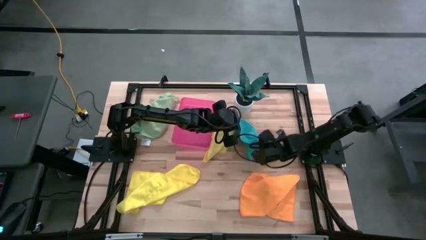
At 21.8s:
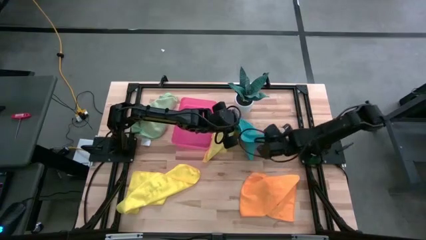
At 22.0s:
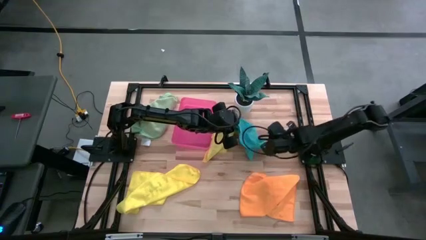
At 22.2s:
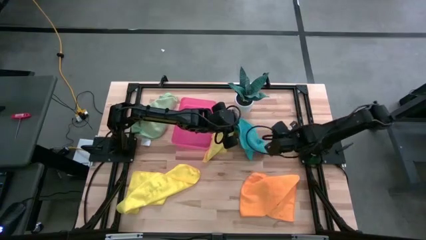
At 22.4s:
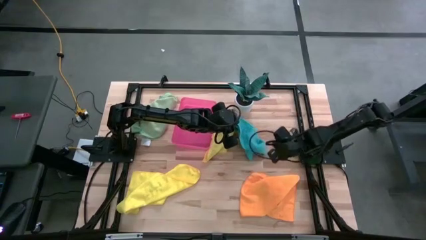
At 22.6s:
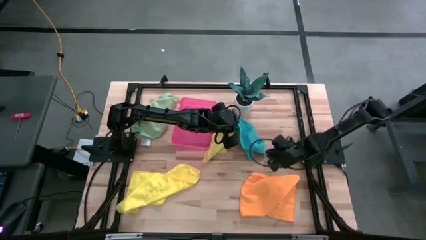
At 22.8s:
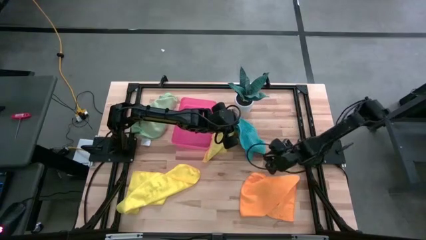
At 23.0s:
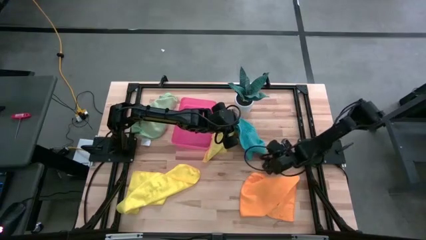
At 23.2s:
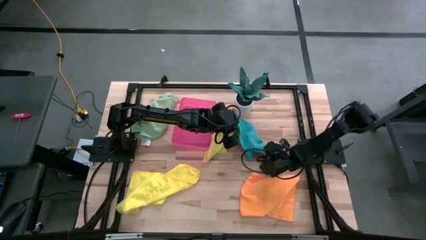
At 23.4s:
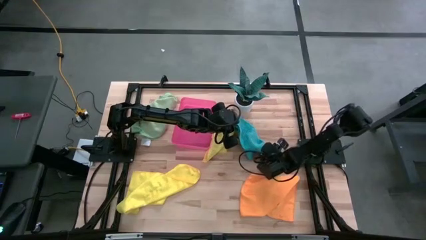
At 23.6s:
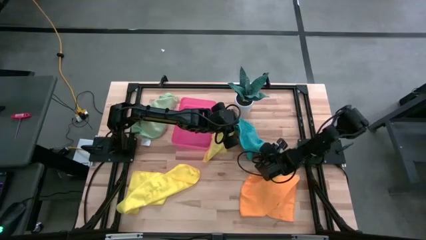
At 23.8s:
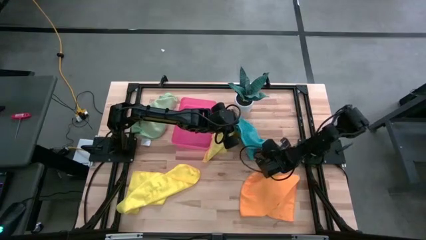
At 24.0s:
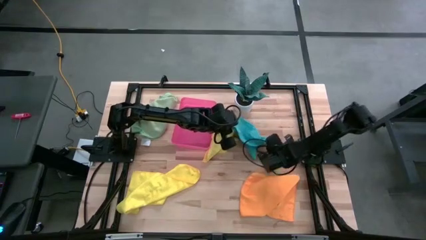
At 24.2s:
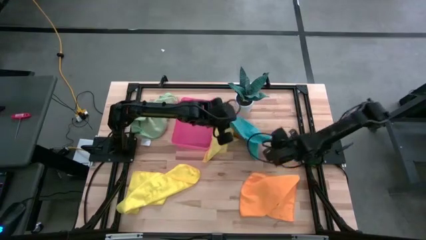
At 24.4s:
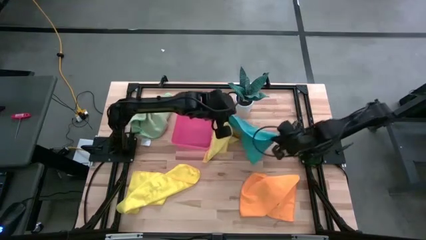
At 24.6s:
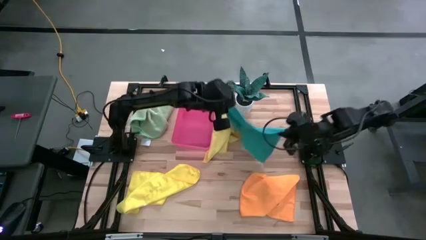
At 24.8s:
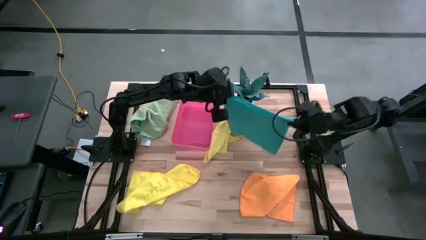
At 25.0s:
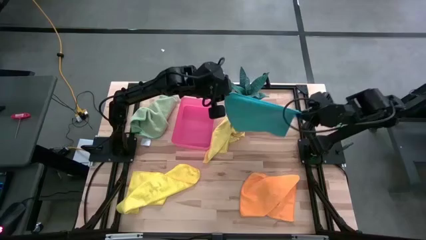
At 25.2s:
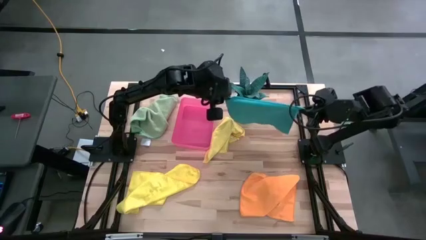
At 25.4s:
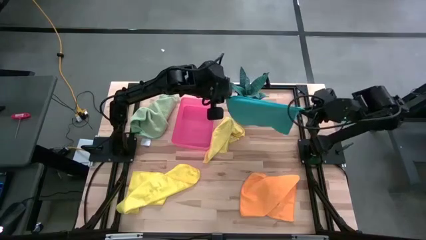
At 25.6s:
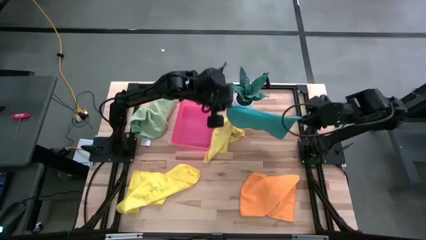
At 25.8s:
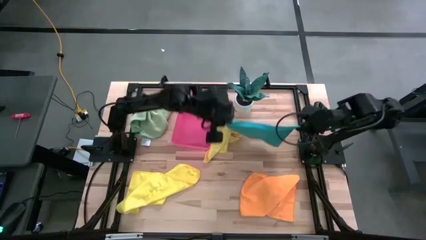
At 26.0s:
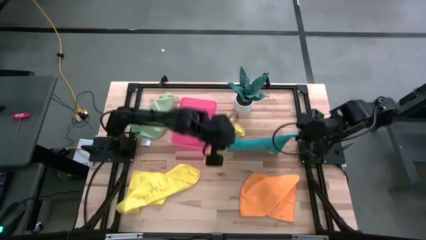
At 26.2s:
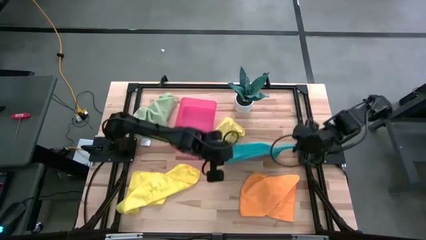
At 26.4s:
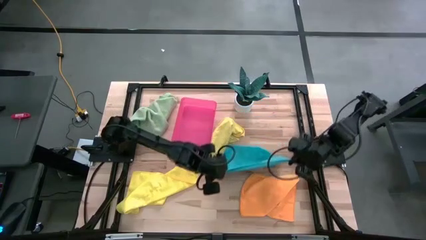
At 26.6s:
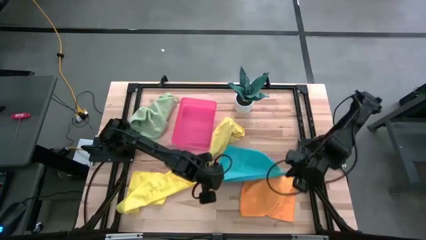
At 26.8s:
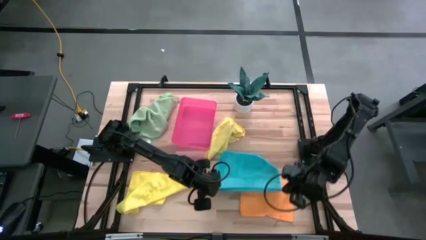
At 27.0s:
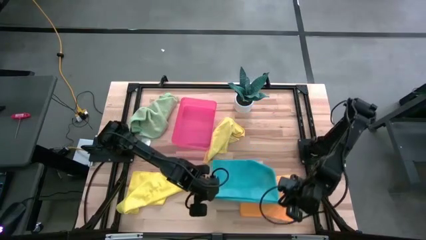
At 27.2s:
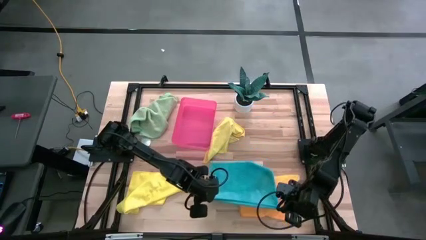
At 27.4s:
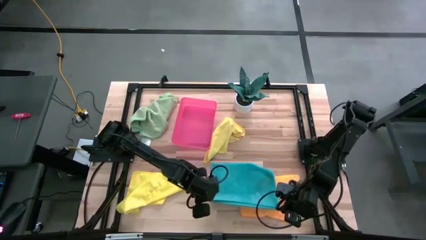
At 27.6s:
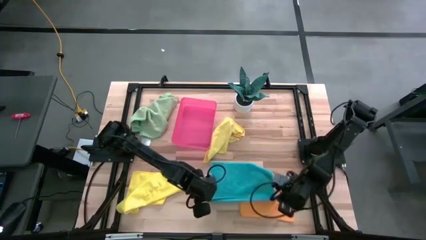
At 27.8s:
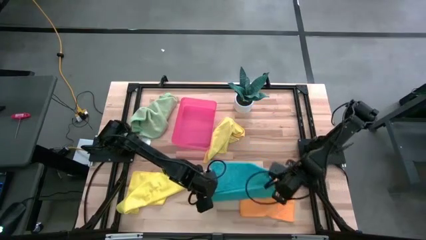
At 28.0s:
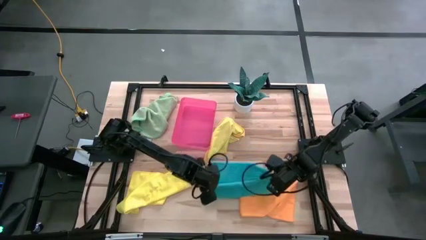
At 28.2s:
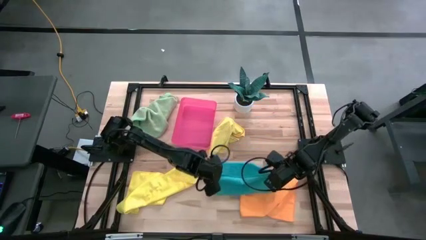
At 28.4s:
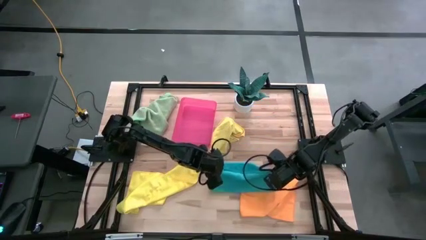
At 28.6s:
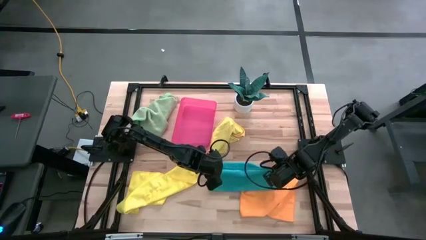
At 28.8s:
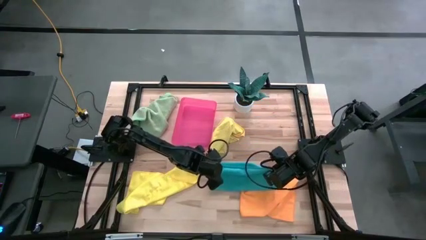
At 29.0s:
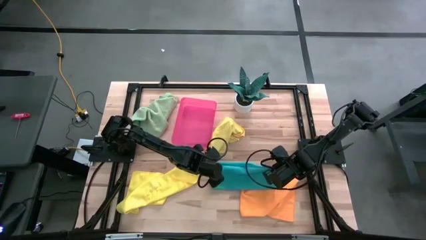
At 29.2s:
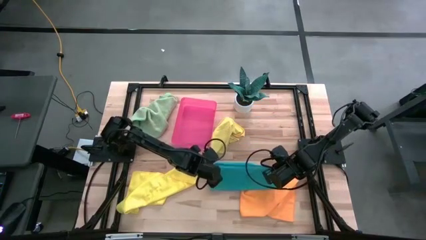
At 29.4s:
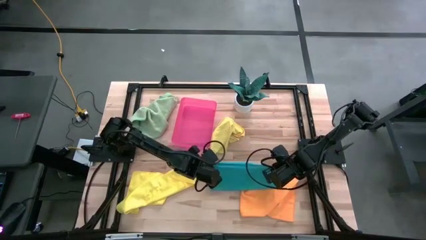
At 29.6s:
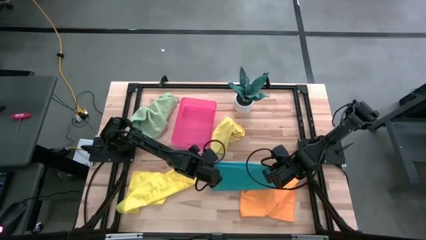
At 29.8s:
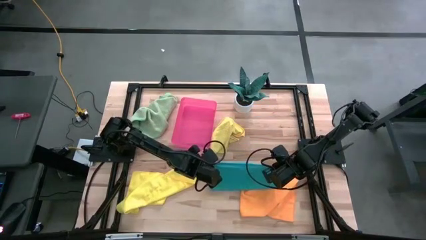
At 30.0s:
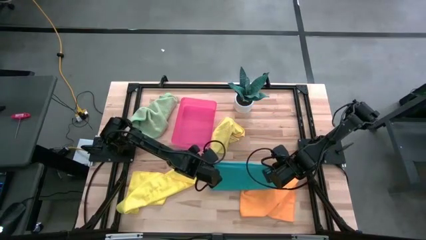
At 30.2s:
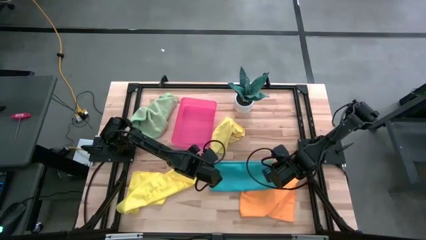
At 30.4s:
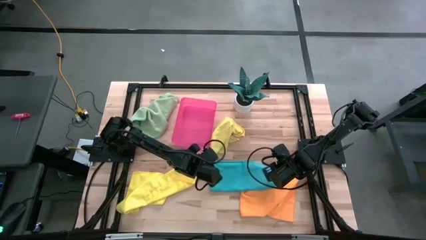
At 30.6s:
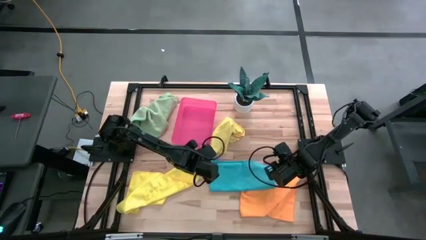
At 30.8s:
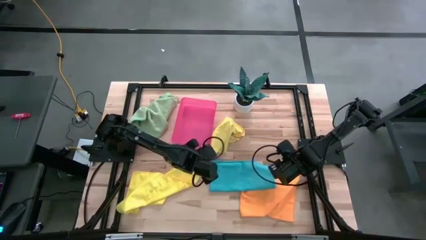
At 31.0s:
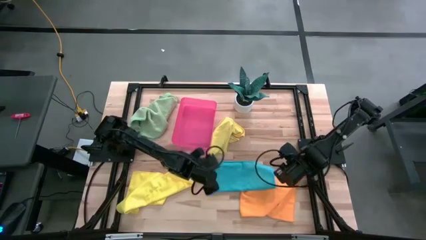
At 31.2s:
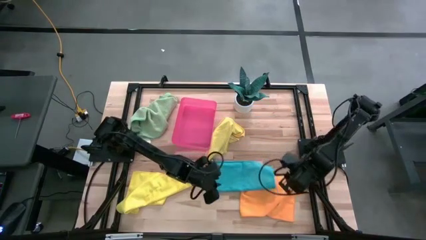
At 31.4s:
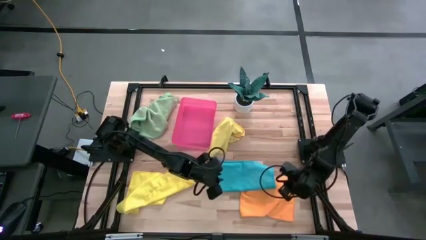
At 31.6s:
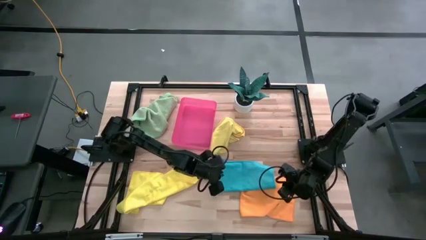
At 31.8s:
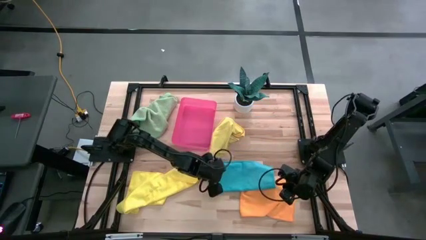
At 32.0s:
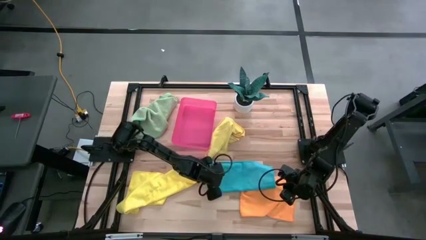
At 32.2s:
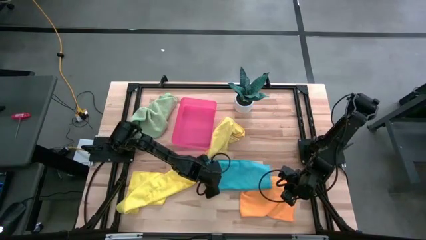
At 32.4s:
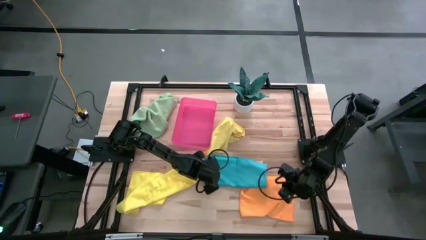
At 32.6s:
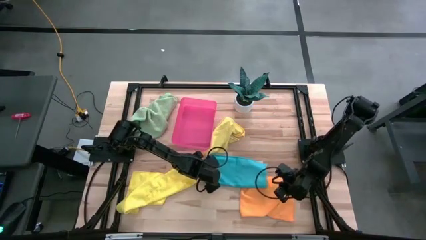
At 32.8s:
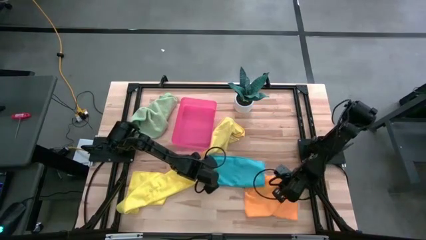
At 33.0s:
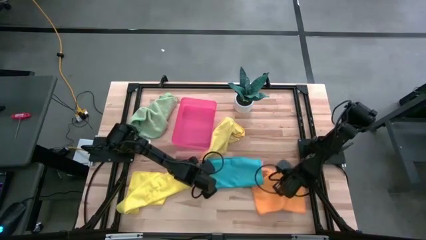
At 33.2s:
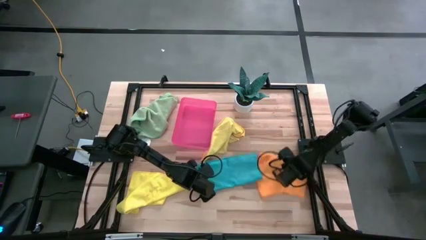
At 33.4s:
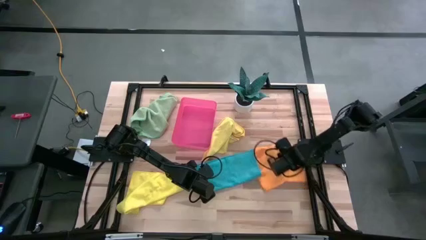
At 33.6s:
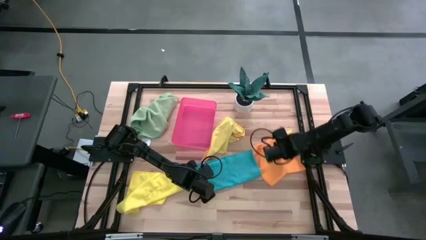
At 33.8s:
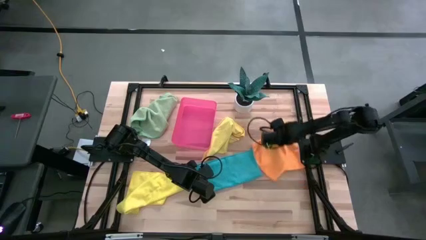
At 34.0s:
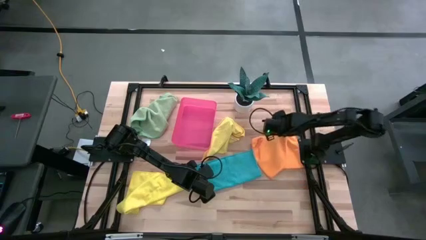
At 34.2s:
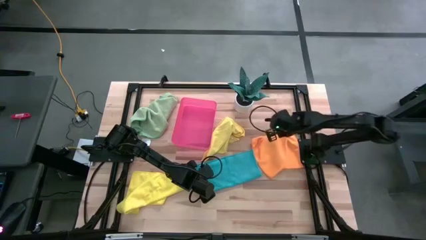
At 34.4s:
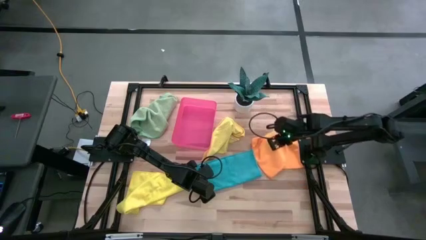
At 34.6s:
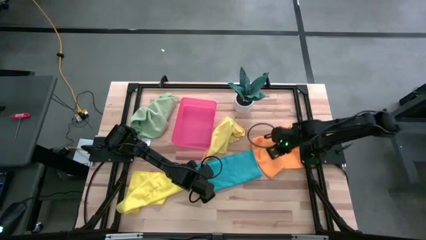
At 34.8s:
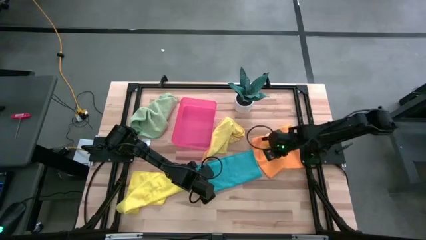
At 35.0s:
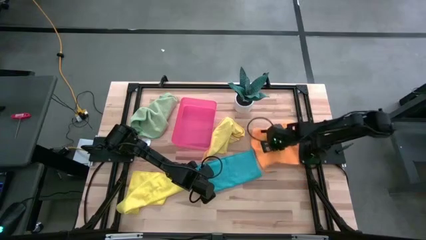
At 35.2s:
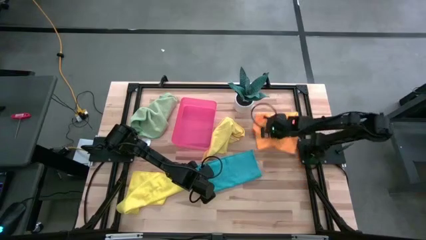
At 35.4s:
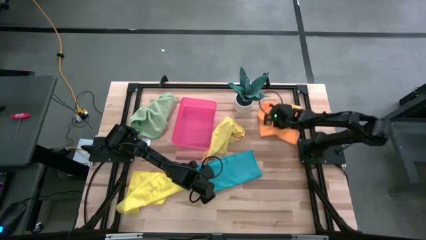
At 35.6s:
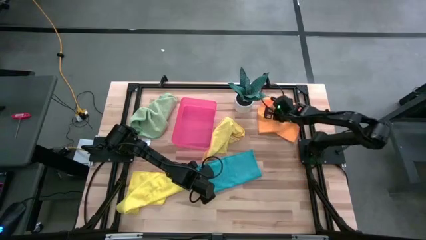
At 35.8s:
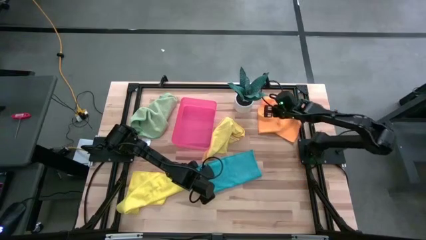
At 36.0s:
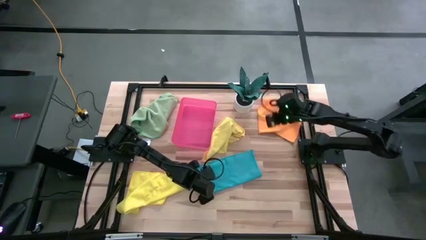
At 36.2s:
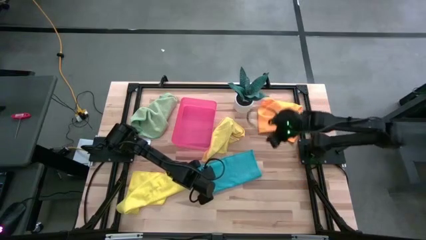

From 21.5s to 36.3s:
Task: Fold microfiber towels
Fold the blue microfiber cloth

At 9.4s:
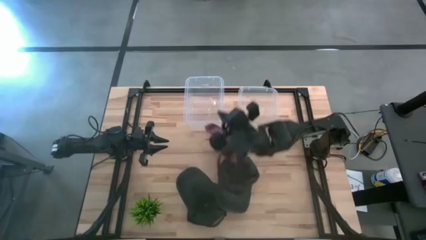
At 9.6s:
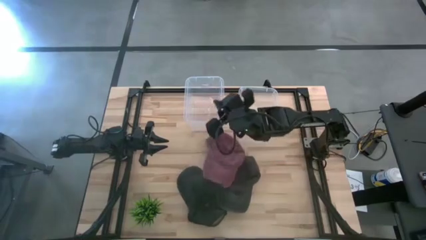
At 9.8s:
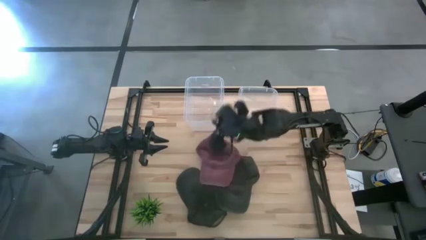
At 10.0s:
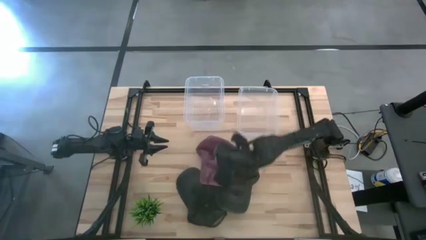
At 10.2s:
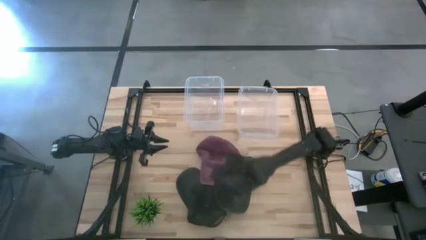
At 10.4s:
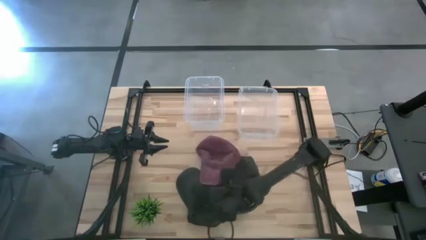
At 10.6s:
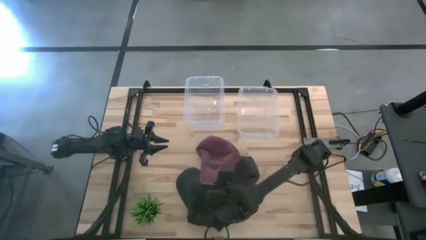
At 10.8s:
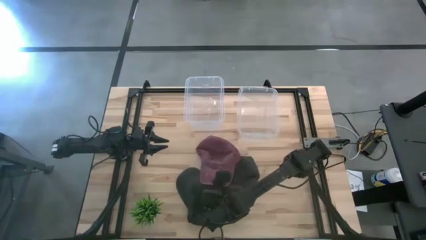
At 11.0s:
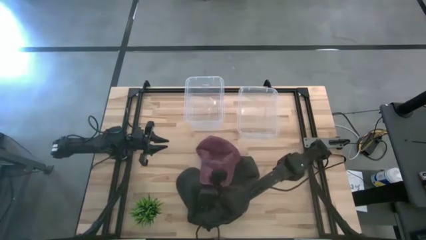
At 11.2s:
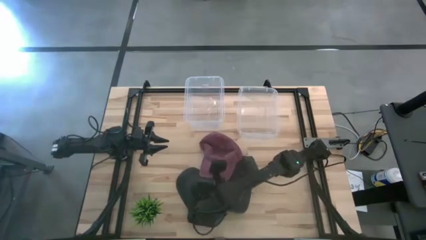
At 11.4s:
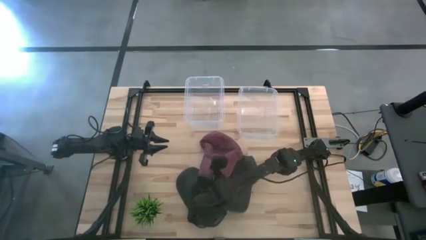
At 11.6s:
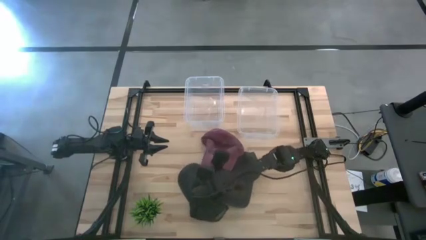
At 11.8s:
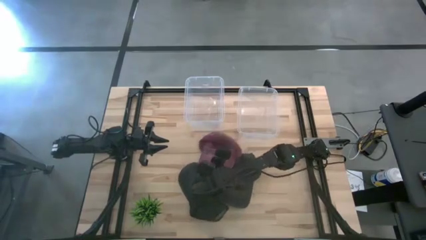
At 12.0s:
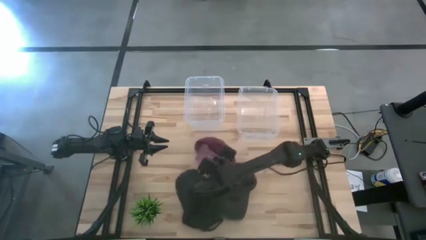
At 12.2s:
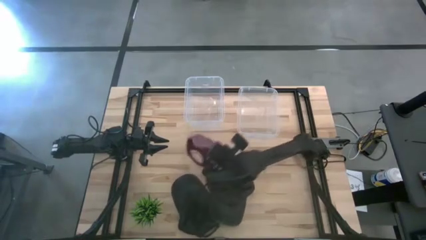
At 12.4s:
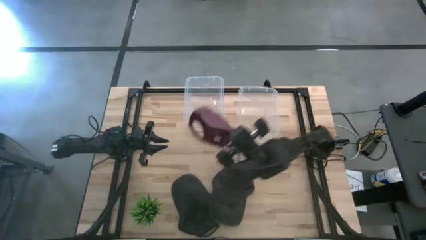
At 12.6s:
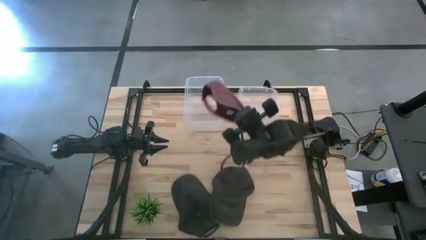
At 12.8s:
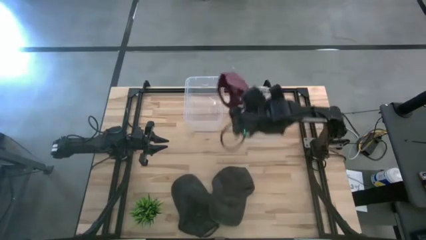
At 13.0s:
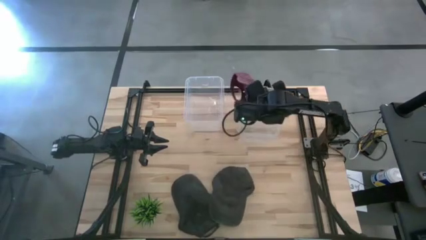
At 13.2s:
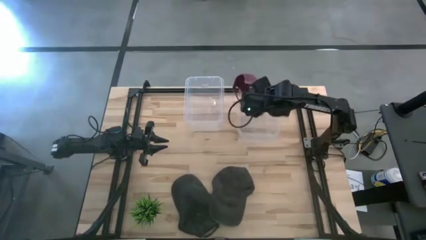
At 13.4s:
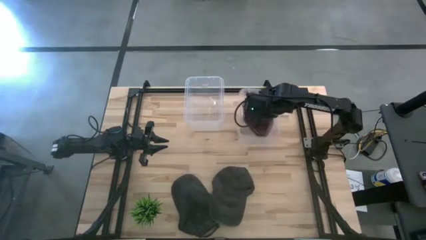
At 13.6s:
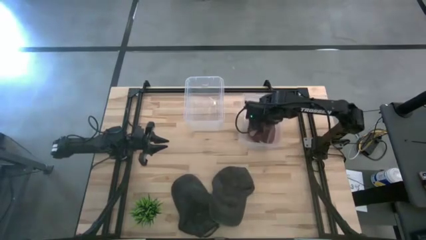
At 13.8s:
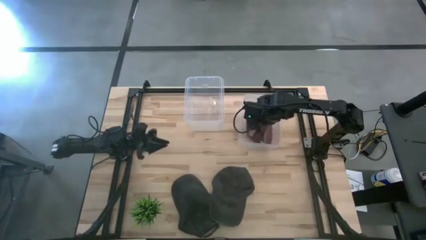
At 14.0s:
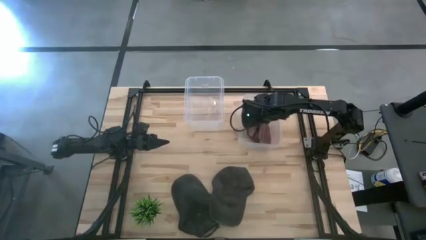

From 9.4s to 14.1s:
Task: Pick & Place hat
Put the red cap into the right transparent bin
